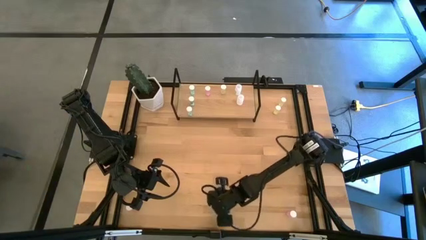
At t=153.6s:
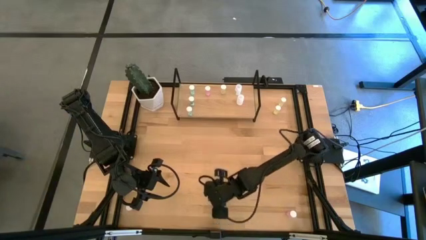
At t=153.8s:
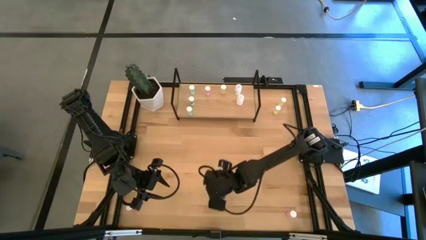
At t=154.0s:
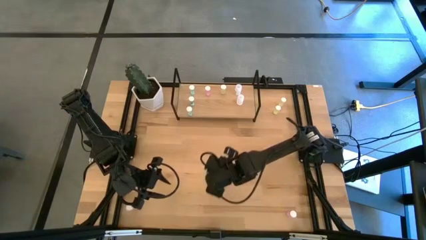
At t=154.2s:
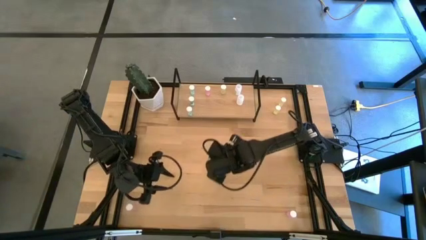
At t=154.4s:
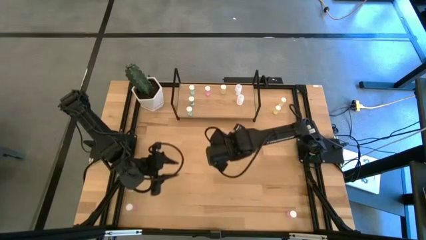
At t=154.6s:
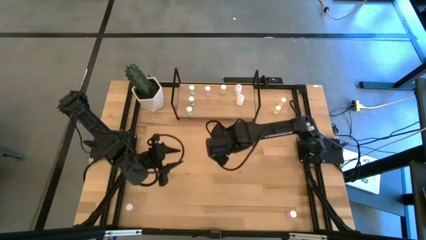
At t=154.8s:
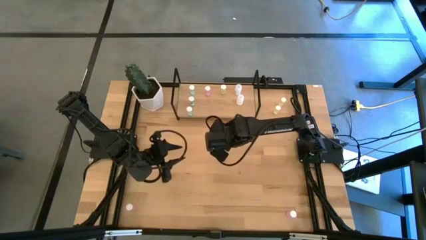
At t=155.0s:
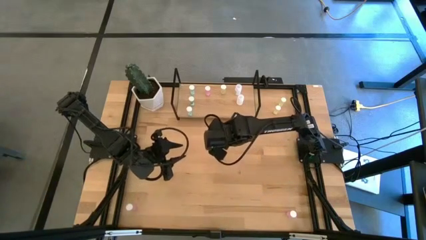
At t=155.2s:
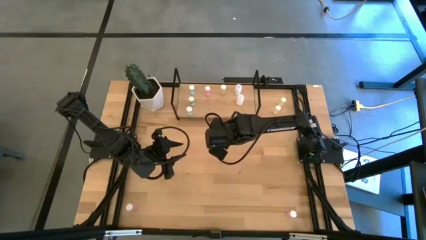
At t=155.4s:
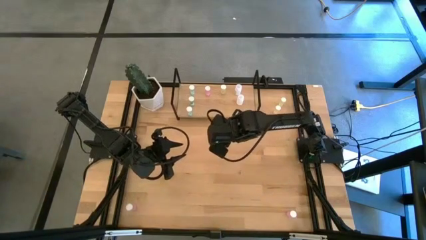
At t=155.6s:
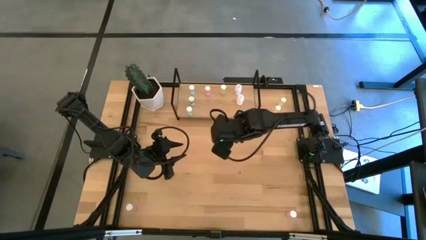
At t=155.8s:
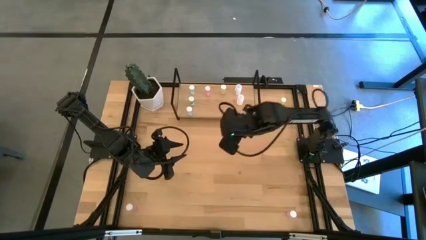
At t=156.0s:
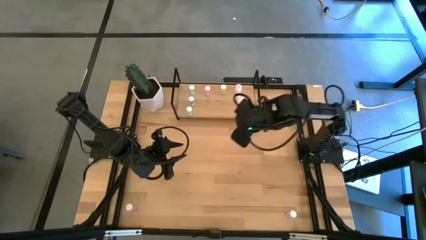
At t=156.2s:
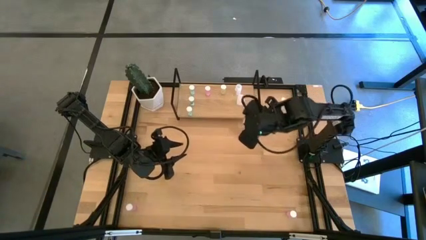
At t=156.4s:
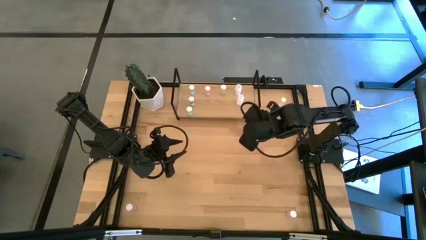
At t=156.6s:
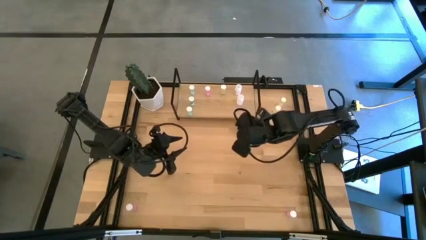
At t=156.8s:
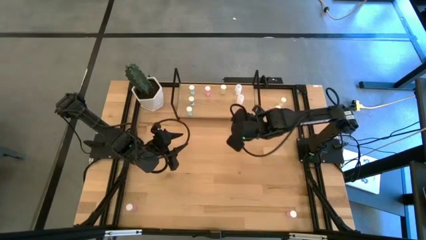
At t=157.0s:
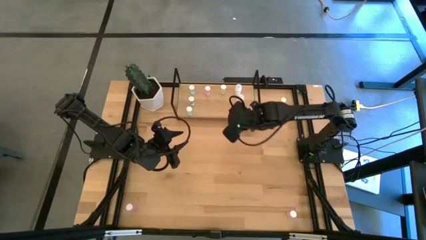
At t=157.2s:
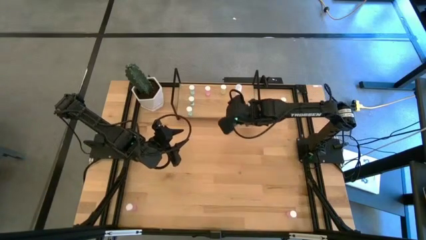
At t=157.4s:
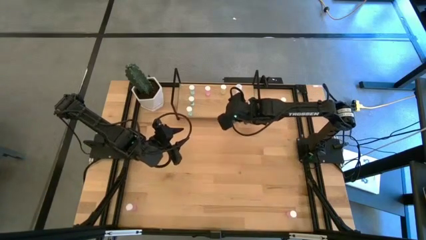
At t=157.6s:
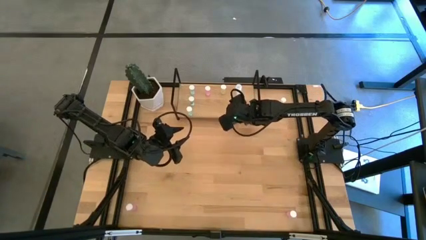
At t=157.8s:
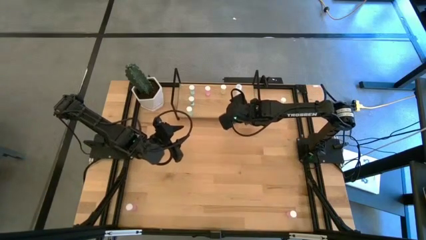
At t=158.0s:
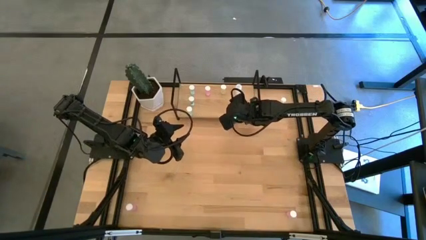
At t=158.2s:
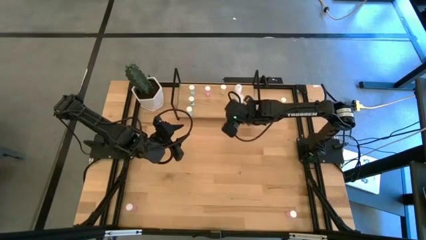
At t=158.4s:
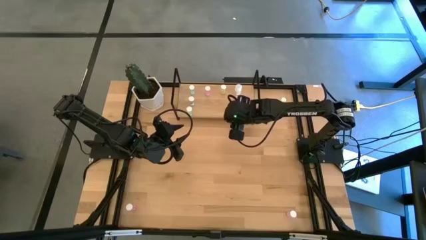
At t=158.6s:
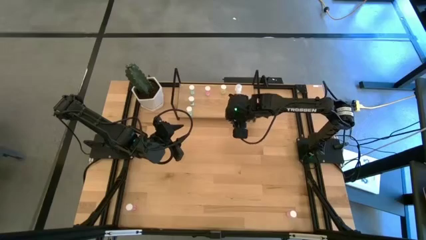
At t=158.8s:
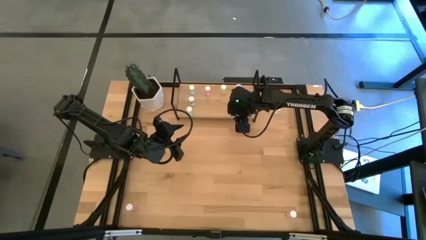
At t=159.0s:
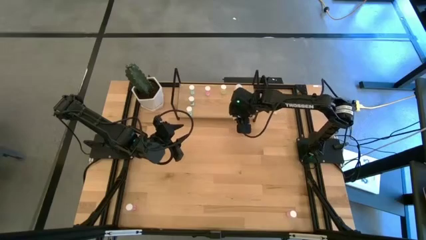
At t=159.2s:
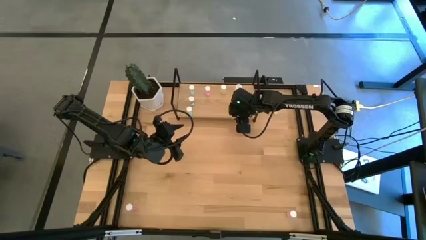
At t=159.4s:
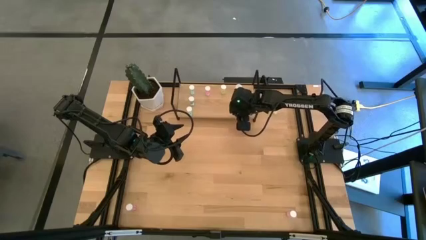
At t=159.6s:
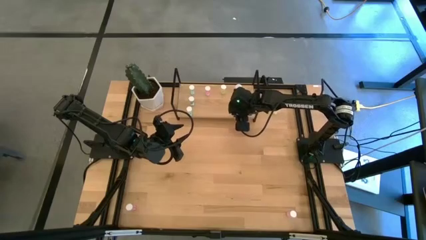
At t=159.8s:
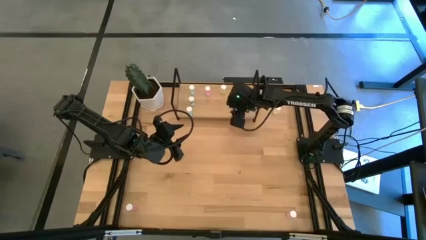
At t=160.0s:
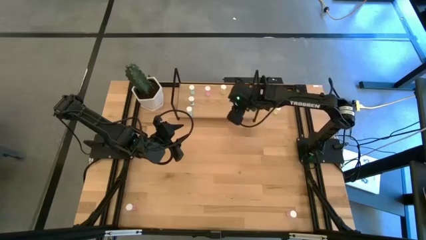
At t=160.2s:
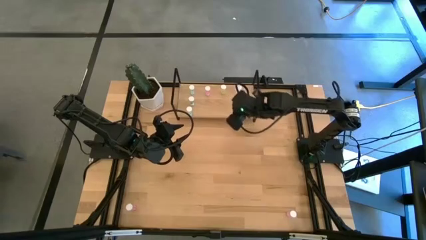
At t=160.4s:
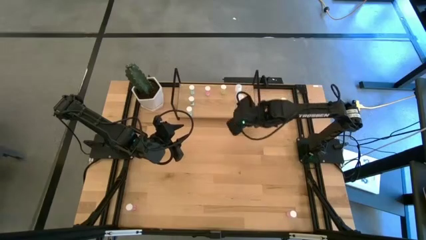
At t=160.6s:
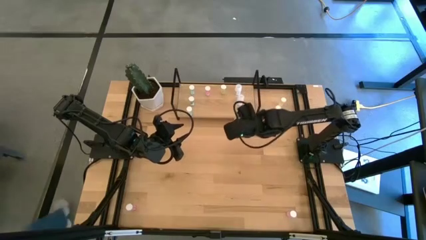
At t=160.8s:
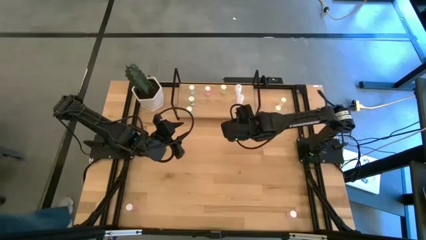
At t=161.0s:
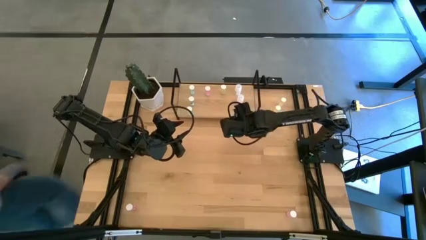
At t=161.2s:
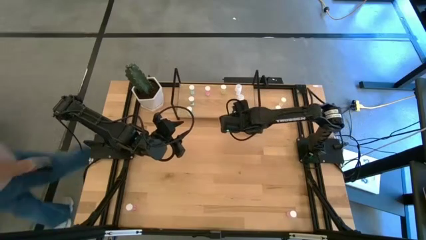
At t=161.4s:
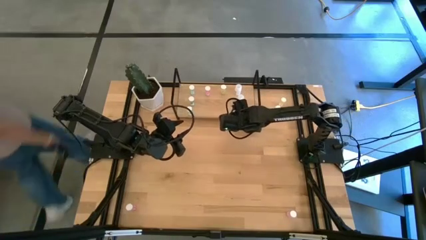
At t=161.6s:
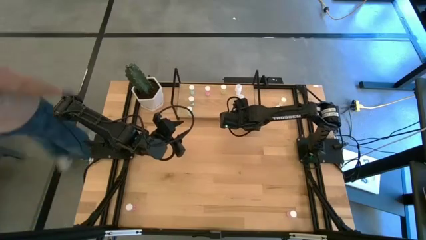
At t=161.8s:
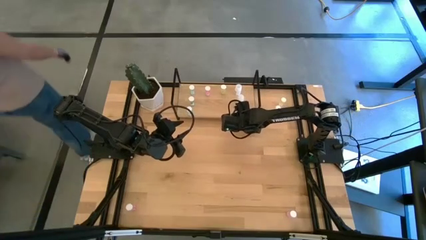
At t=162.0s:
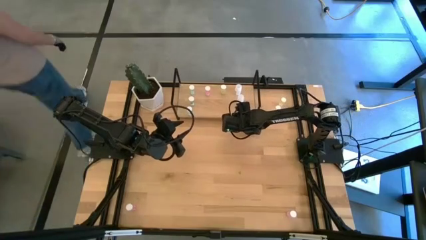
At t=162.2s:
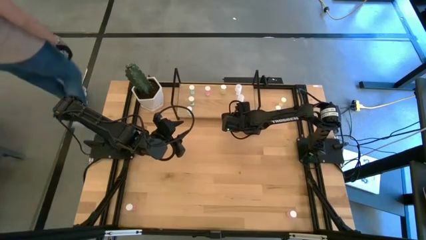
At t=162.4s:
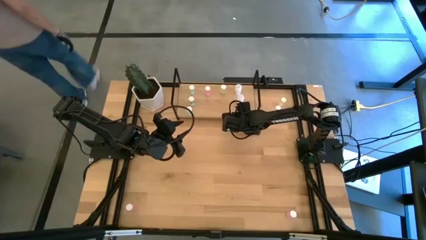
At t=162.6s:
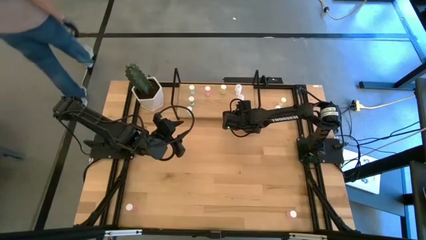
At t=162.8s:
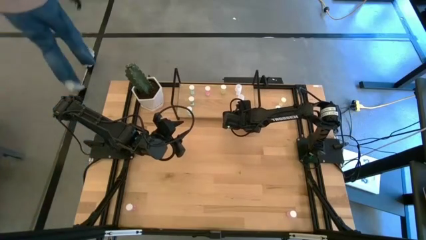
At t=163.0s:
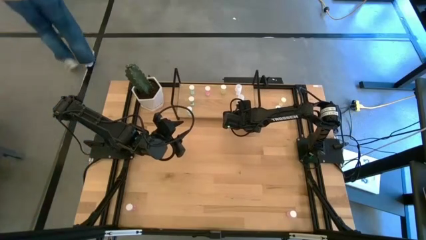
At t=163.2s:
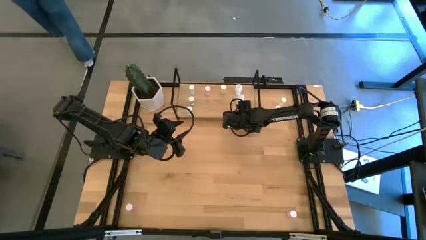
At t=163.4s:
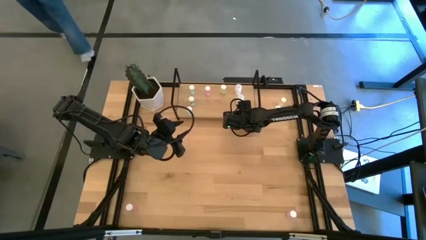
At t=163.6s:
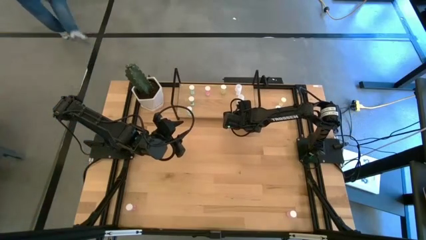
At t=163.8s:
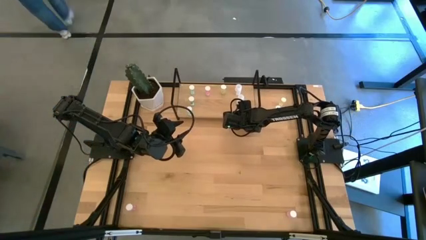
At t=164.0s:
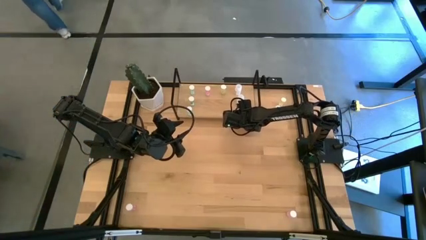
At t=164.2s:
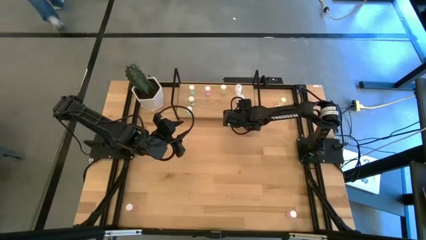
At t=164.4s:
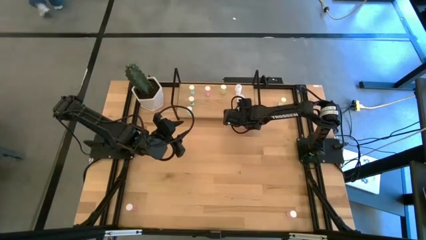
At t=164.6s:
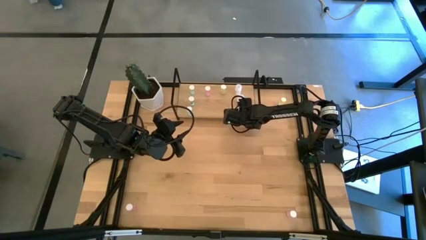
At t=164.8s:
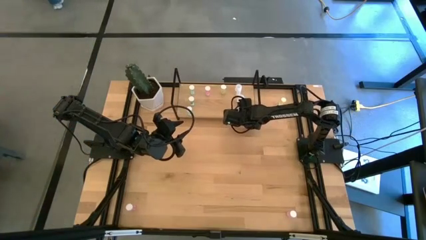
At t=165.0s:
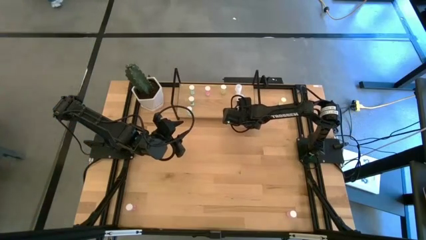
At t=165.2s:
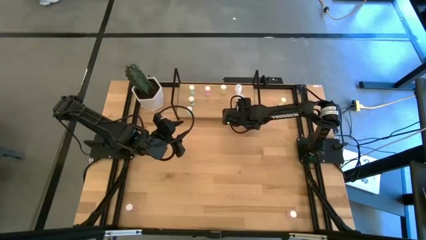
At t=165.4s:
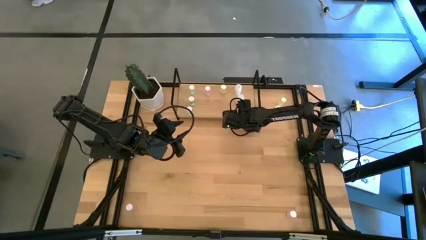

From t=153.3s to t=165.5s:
Task: Pick and place medicine bottles onto shelf by color
Put the white pill bottle on the shelf aligned with the other white pill bottle

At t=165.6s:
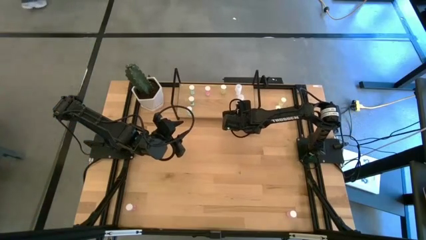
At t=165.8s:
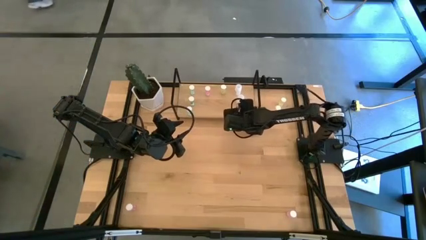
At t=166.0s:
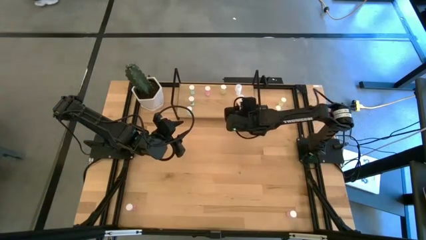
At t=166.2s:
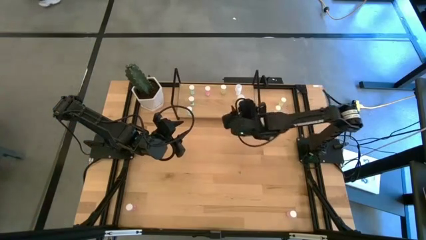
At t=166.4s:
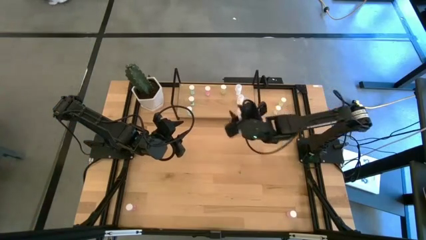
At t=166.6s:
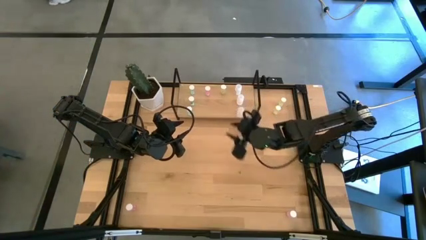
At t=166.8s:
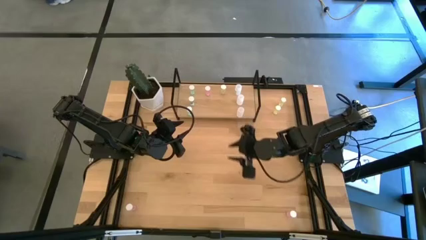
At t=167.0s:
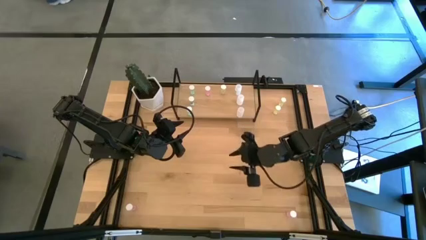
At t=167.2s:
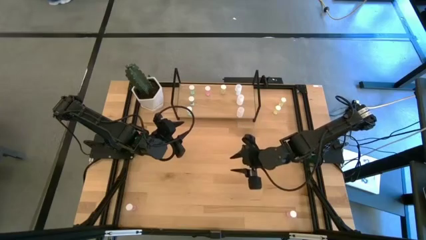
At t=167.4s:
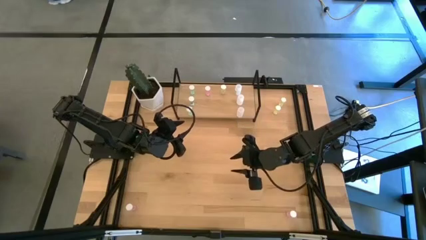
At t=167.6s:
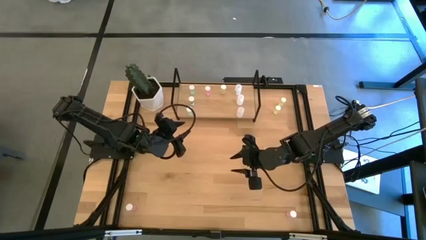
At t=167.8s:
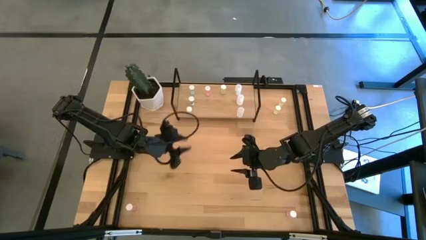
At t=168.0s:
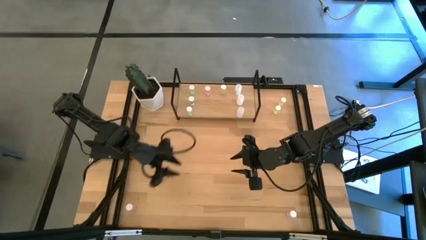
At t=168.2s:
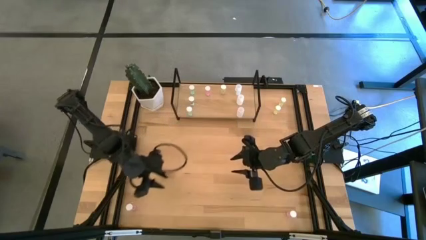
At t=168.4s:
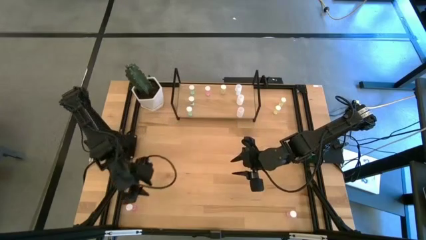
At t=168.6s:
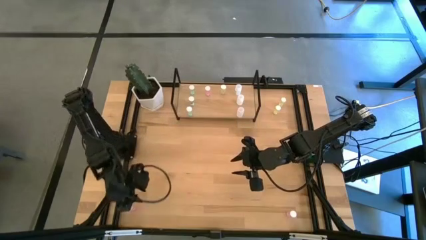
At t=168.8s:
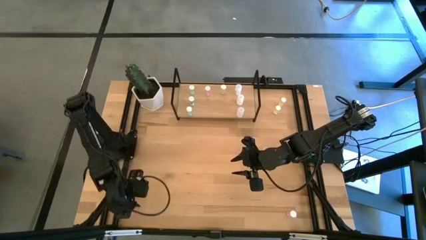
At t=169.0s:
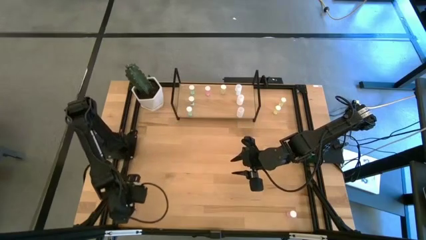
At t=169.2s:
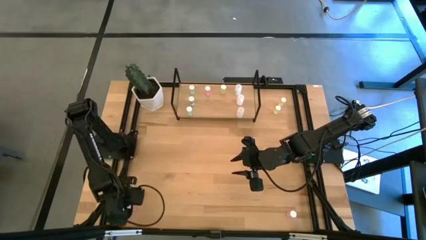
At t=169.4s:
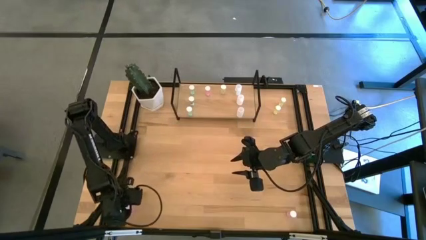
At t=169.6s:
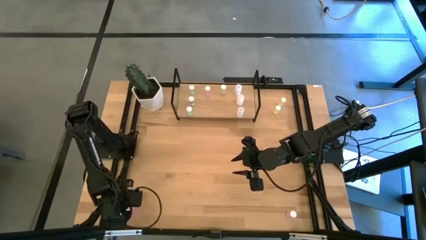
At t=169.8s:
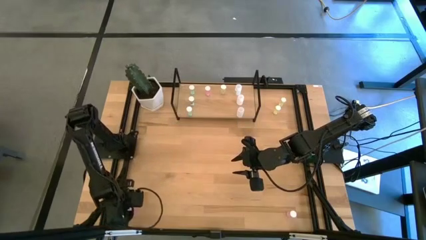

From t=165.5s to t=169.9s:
Put the left pink pill bottle on the shelf aligned with the other pink pill bottle
